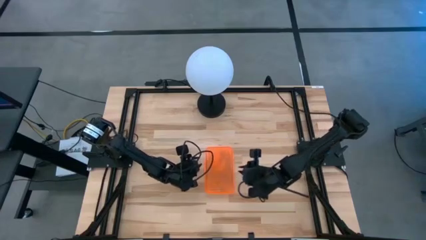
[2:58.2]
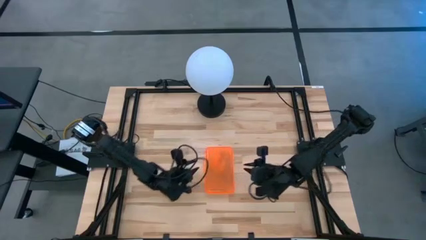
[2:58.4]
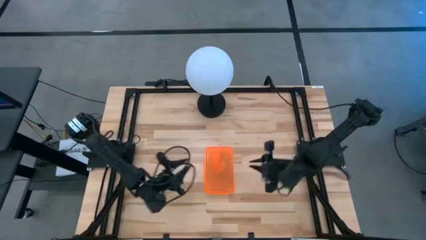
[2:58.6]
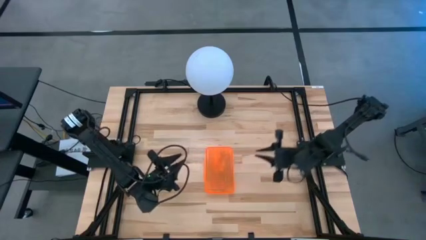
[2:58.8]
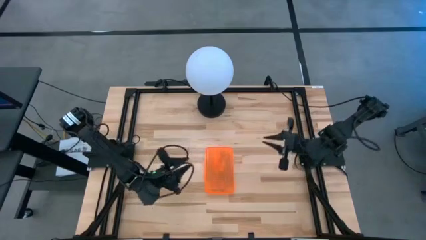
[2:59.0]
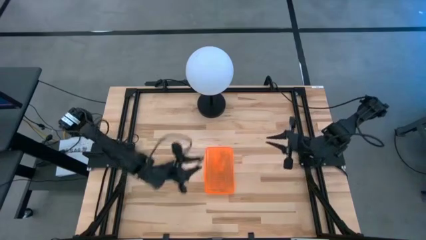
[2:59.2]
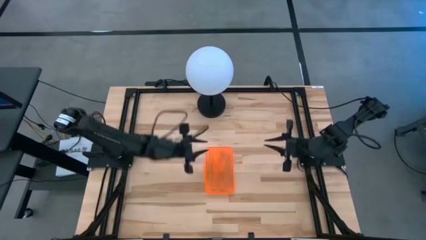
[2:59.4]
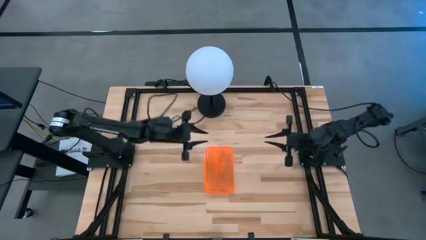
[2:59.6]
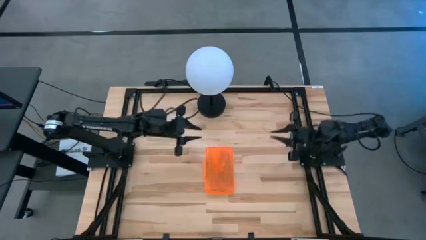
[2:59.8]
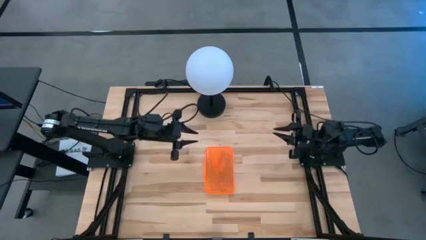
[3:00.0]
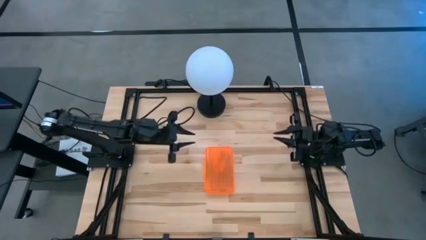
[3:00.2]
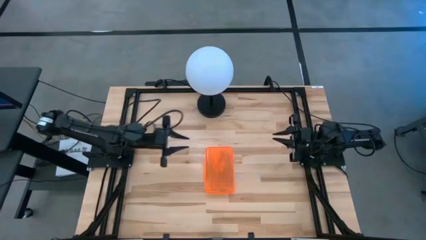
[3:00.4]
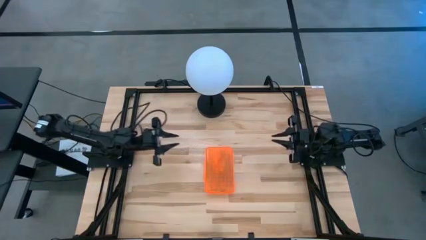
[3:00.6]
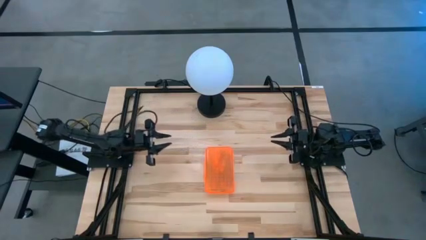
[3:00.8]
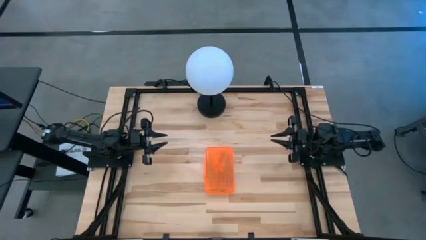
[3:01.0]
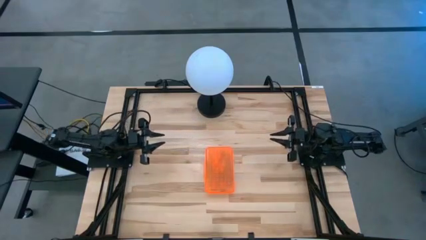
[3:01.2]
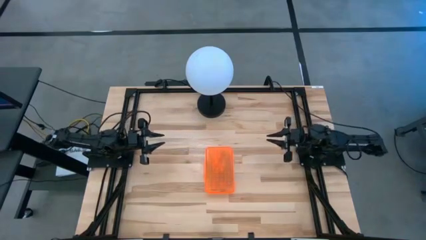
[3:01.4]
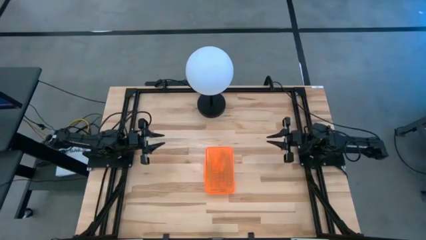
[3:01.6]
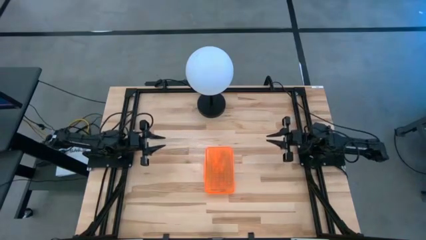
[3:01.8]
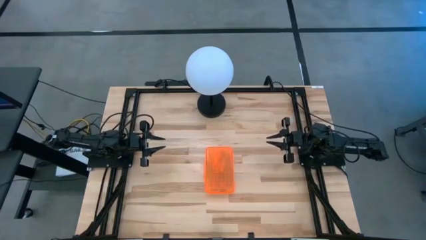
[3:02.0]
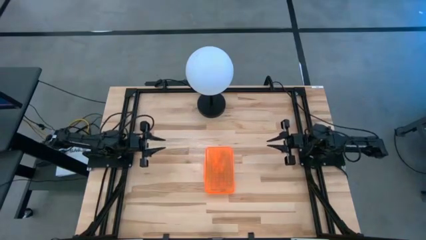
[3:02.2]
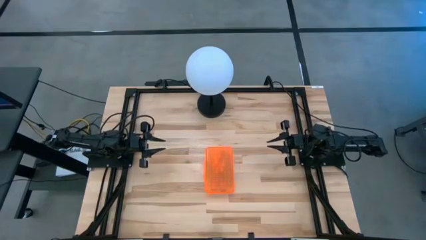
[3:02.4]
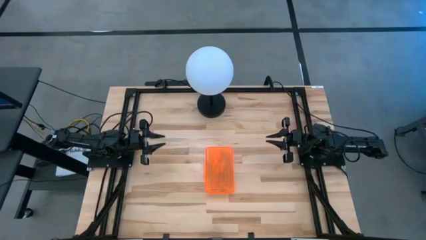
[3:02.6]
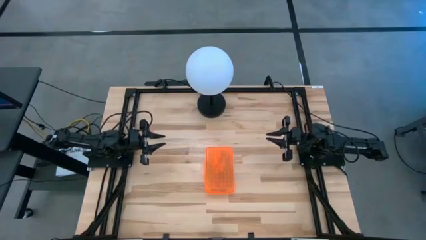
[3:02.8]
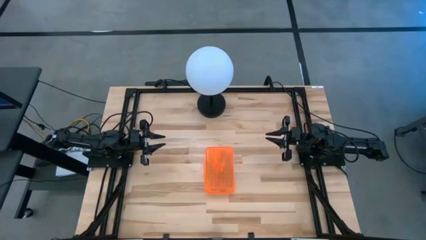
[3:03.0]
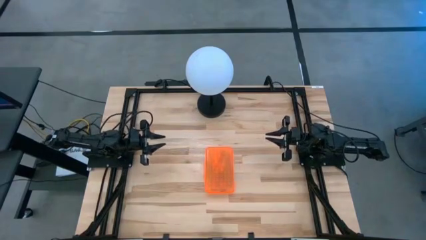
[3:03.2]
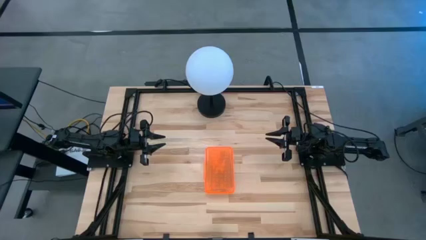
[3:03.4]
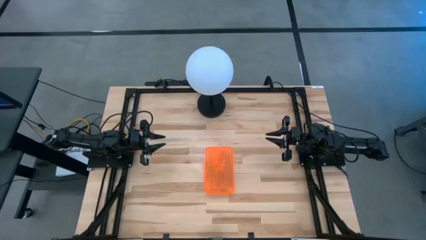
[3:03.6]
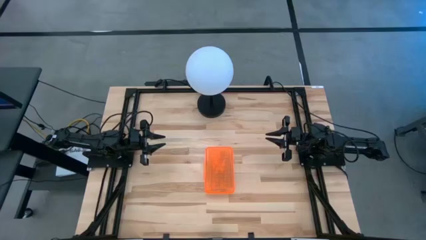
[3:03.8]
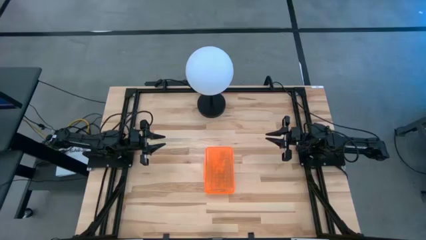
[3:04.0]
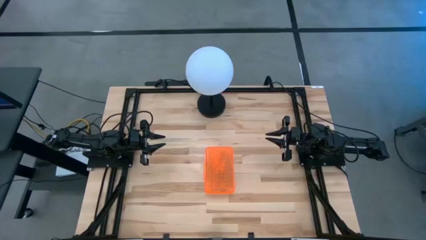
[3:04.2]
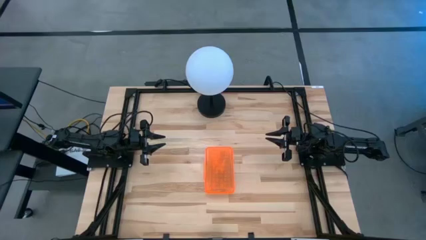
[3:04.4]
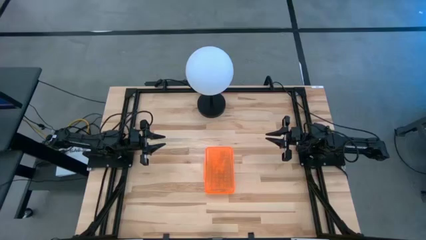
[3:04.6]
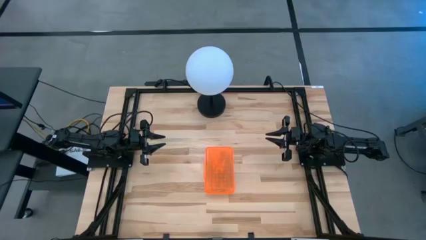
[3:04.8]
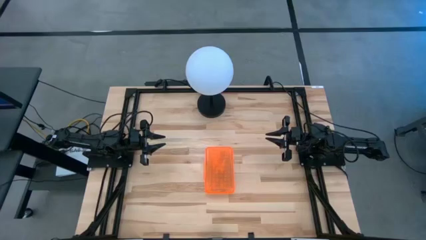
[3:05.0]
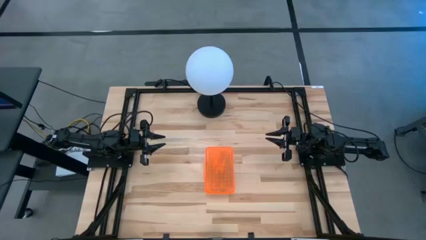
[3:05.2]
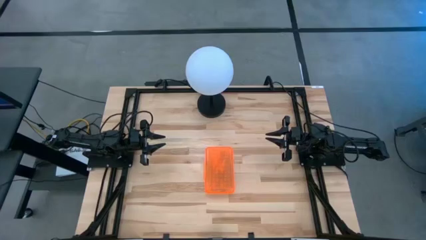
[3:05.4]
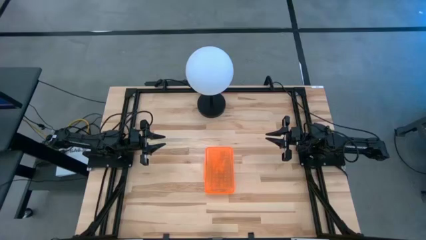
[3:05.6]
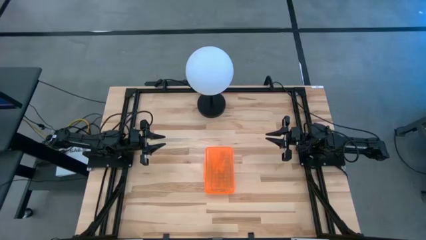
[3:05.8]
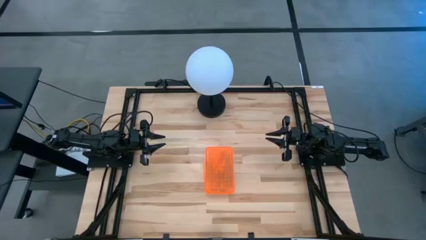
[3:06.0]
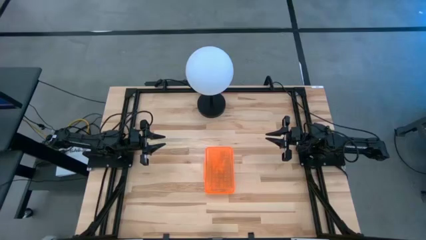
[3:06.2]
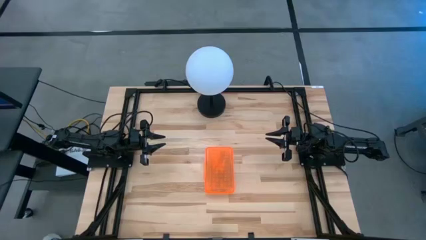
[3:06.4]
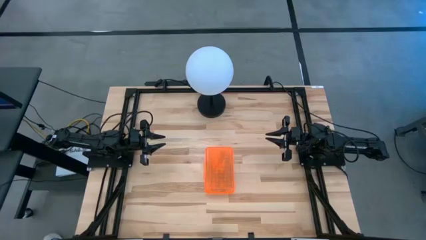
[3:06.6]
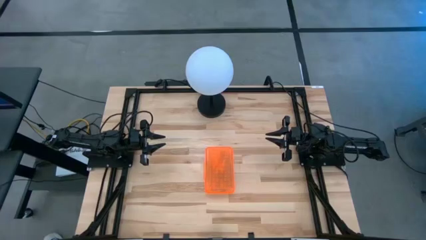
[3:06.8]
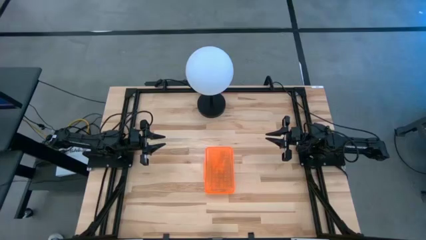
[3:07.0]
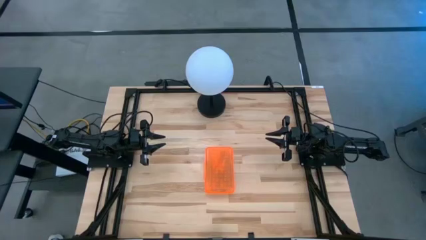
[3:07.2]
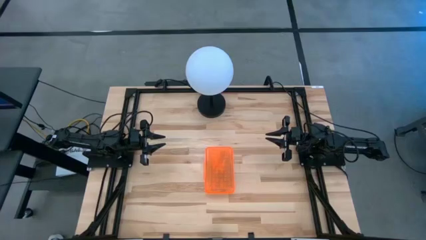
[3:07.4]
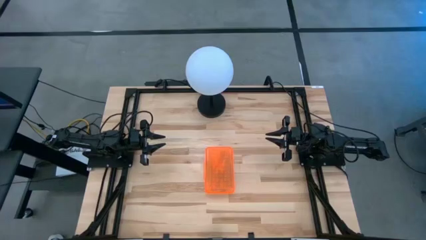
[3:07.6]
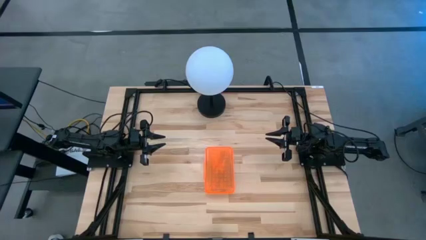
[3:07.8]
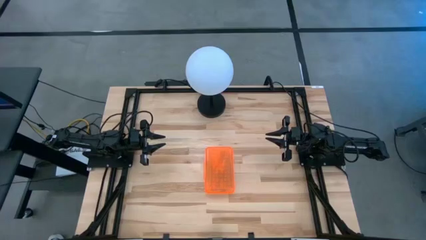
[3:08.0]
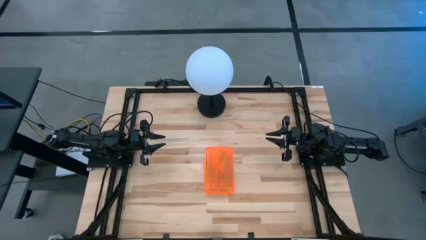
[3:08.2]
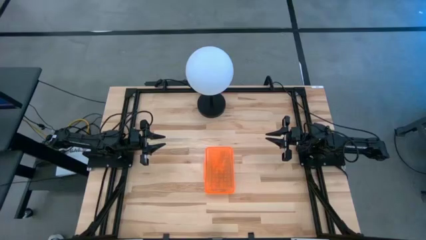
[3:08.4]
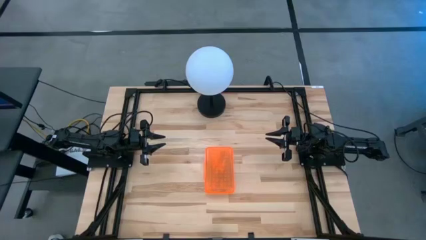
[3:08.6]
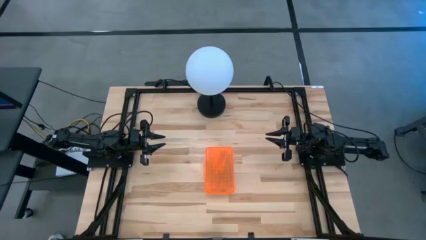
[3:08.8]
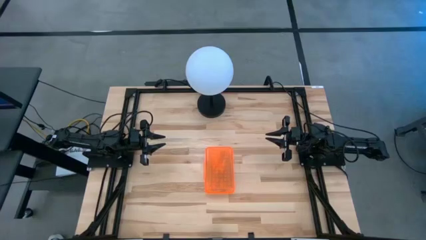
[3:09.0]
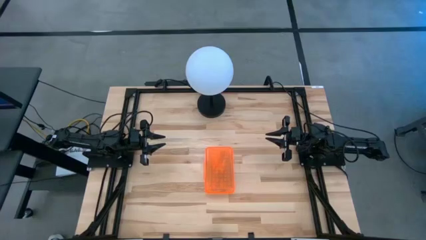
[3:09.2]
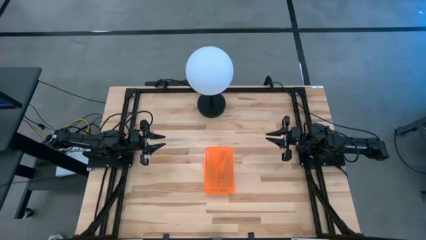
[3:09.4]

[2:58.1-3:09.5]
Task: Pick & place school supplies into a supply box
Return to Home Position

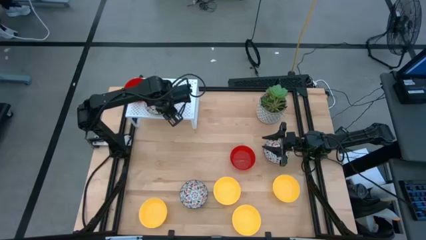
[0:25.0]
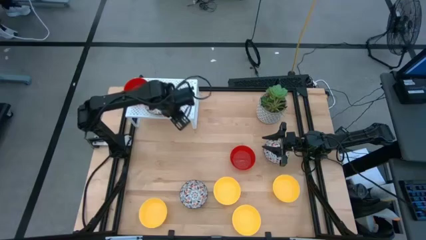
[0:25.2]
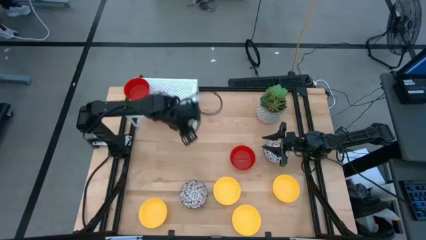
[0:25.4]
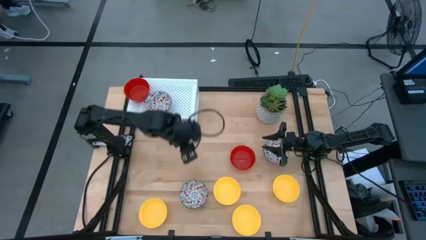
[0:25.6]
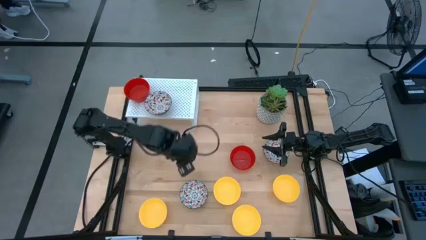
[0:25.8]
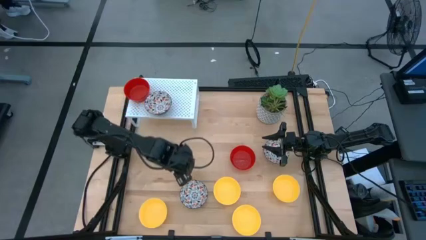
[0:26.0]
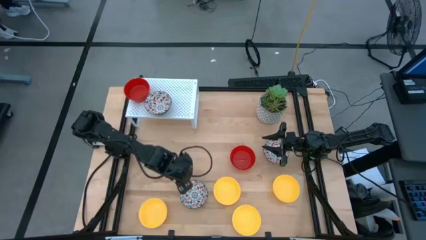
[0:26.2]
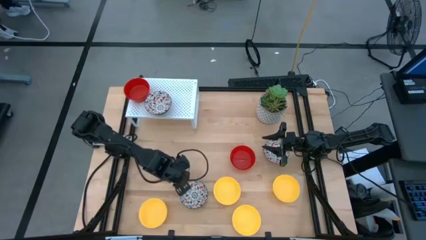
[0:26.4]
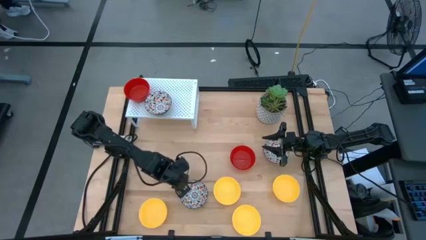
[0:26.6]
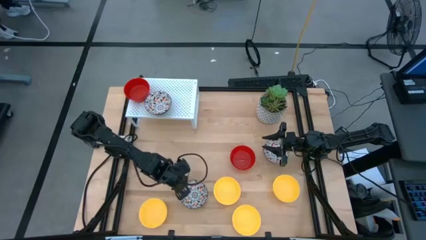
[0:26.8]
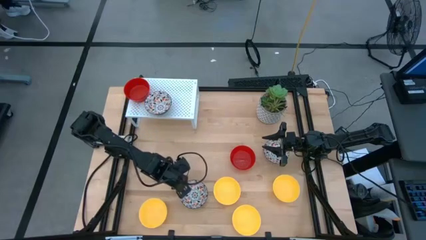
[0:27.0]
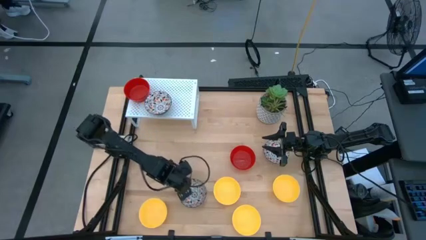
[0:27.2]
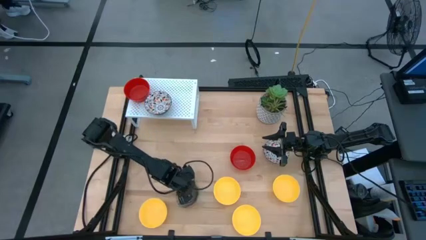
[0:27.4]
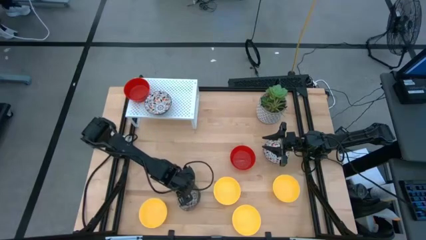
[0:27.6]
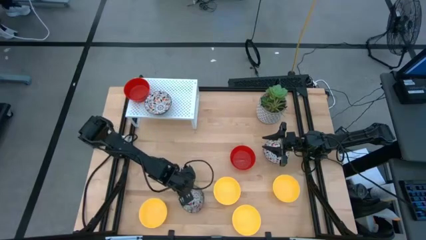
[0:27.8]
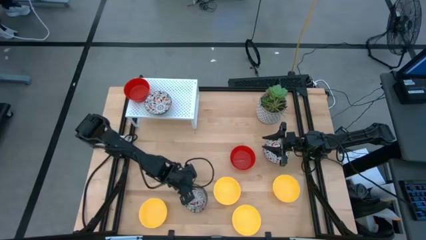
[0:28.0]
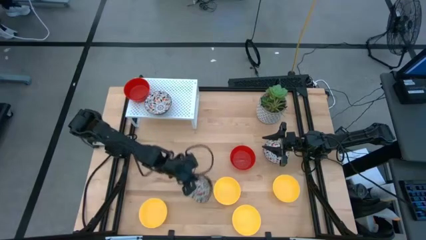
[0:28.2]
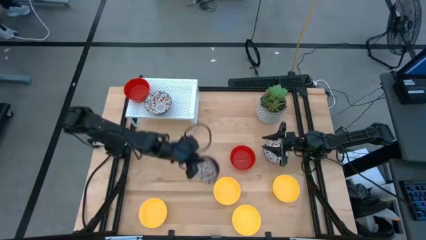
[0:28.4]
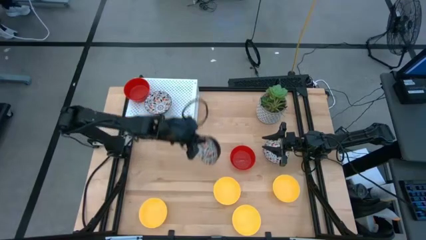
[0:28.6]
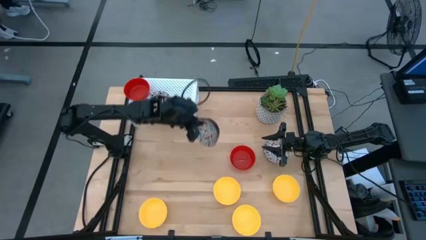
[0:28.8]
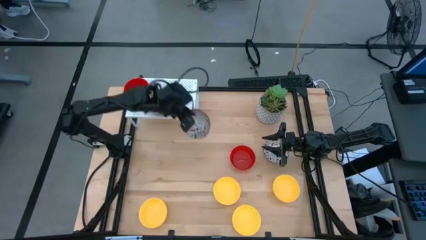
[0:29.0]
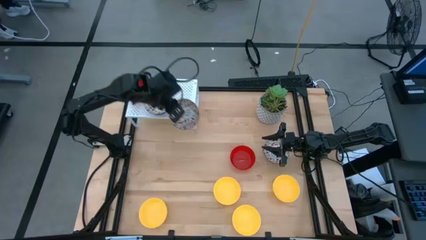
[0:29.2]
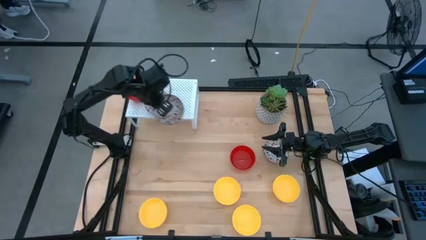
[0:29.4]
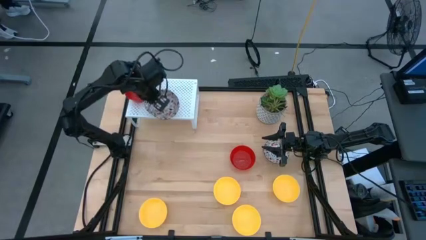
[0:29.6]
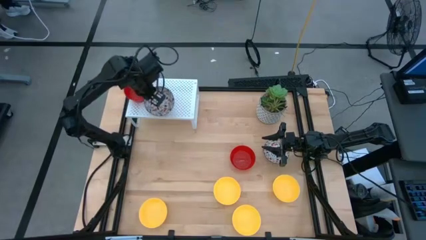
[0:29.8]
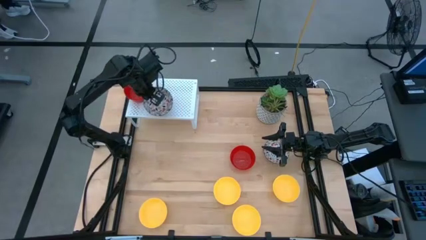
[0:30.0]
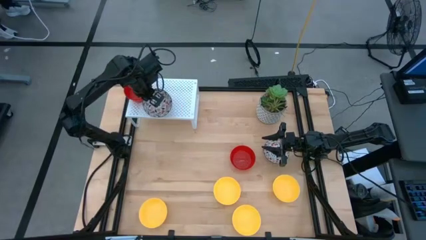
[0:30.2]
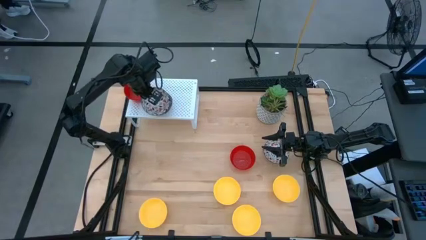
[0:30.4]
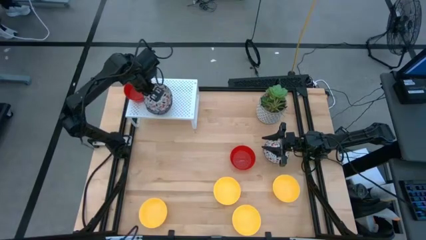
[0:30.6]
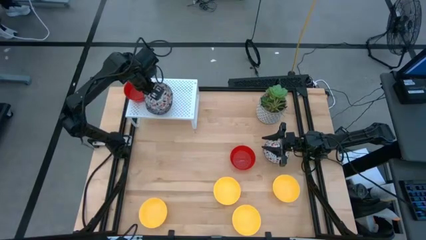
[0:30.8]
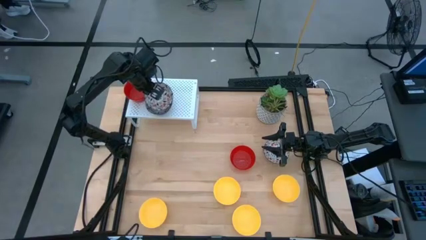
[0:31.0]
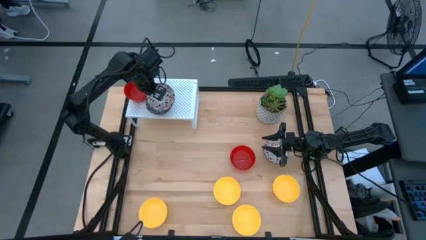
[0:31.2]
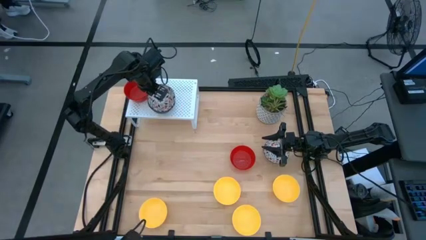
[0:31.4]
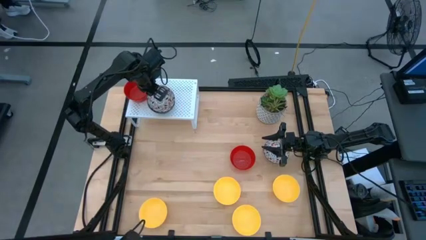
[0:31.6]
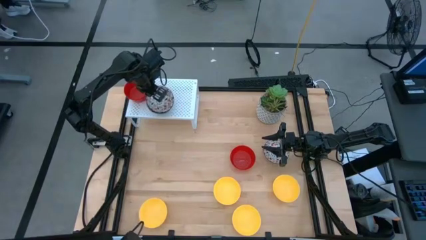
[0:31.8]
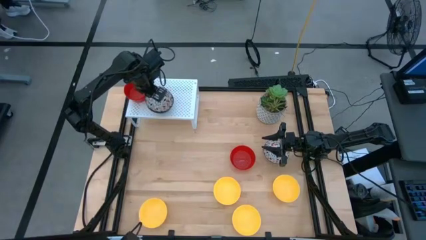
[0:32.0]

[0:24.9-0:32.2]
Task: Pick & Place Mini bowls
Stack the black bowl on top of the black bowl on the shelf
